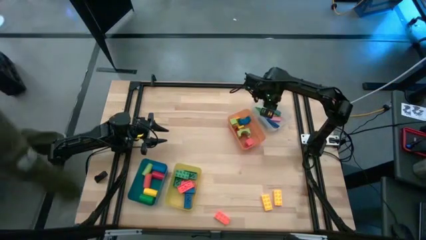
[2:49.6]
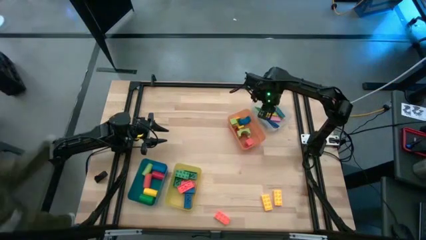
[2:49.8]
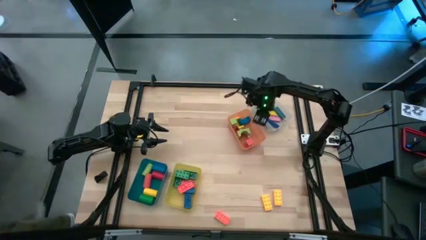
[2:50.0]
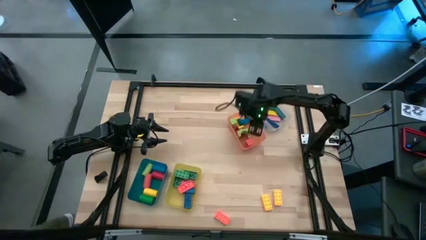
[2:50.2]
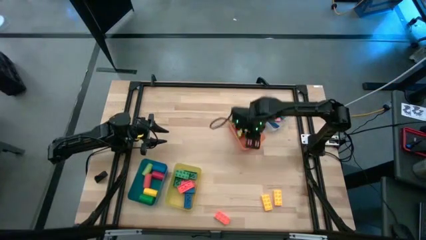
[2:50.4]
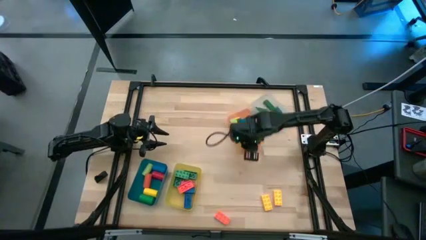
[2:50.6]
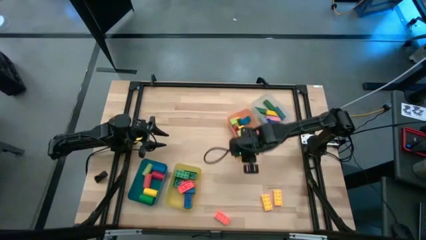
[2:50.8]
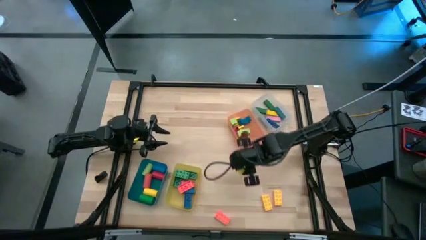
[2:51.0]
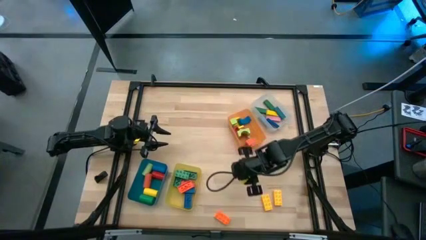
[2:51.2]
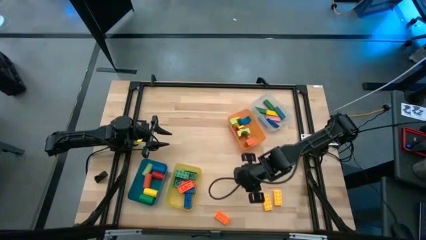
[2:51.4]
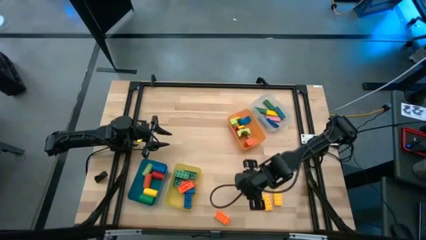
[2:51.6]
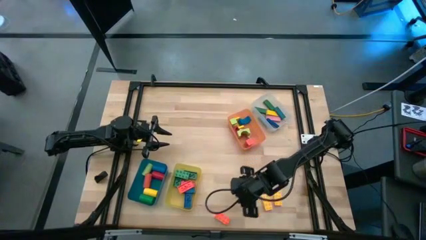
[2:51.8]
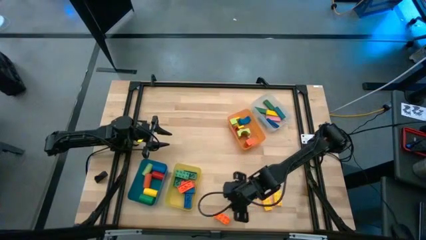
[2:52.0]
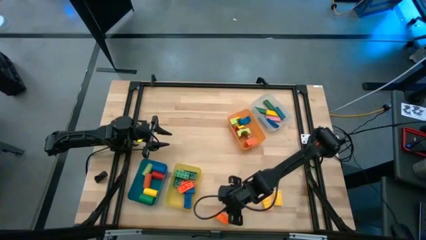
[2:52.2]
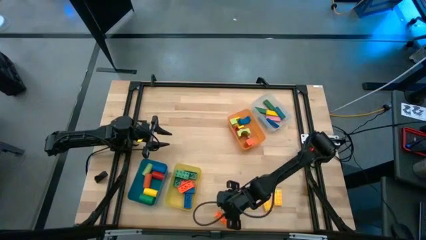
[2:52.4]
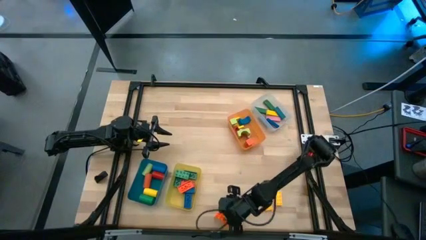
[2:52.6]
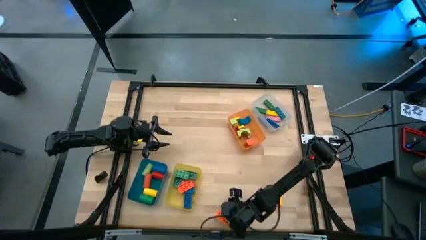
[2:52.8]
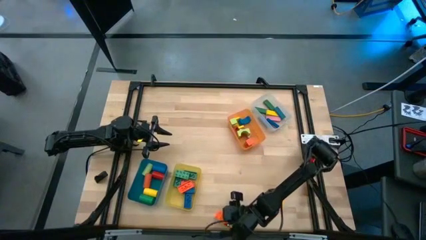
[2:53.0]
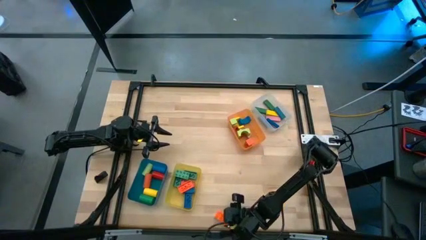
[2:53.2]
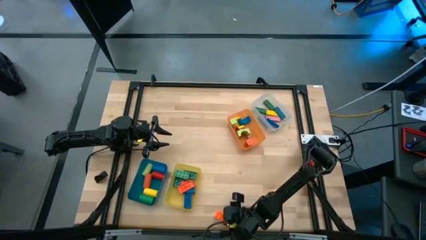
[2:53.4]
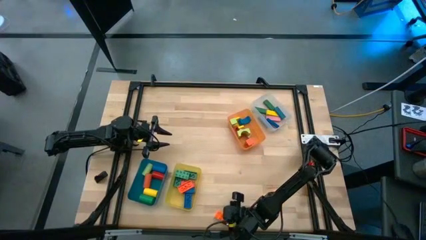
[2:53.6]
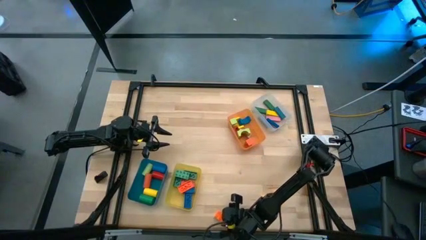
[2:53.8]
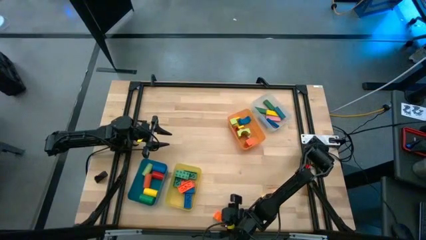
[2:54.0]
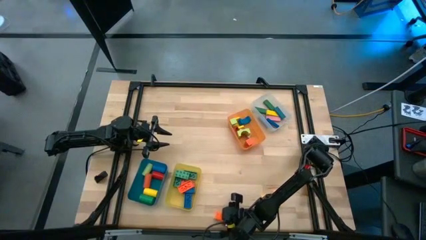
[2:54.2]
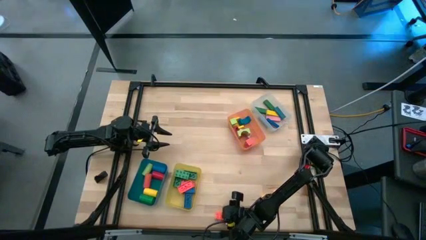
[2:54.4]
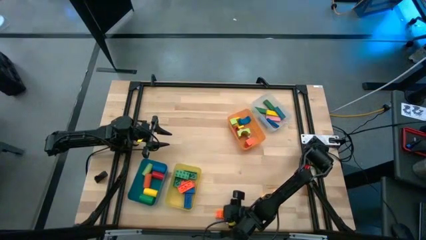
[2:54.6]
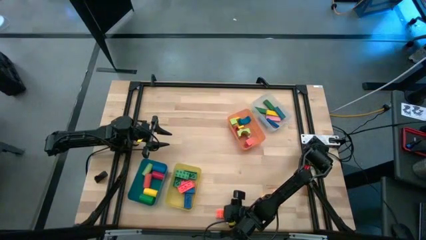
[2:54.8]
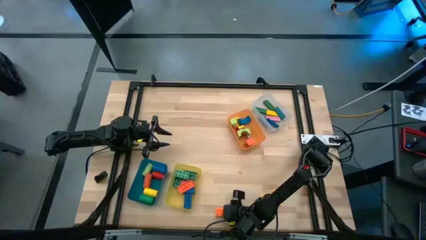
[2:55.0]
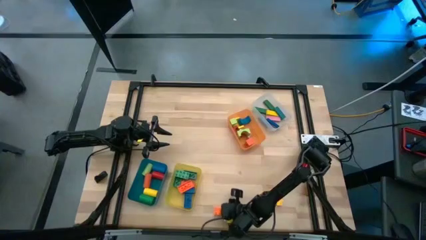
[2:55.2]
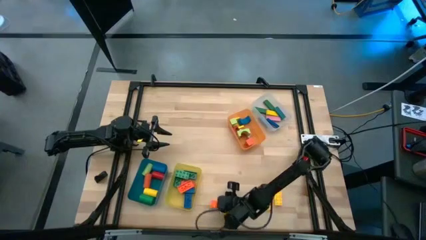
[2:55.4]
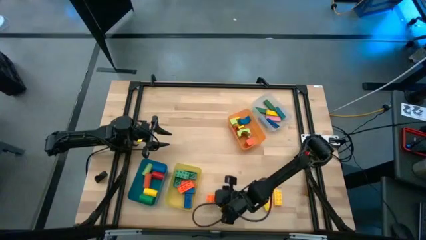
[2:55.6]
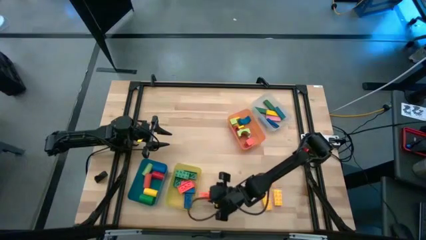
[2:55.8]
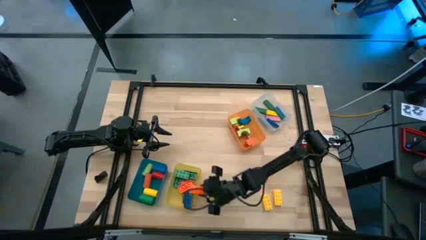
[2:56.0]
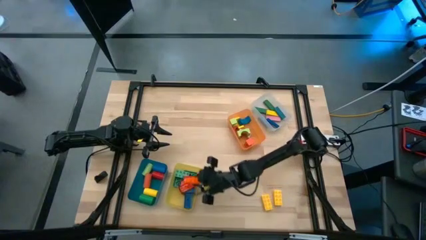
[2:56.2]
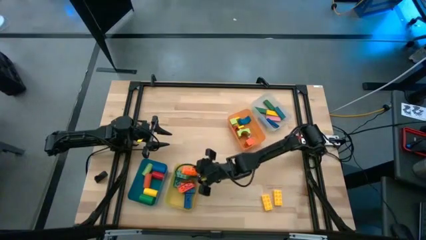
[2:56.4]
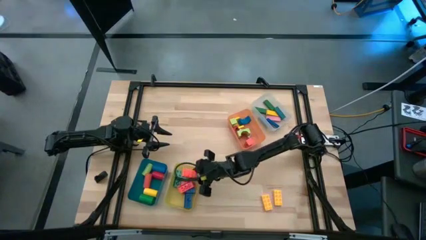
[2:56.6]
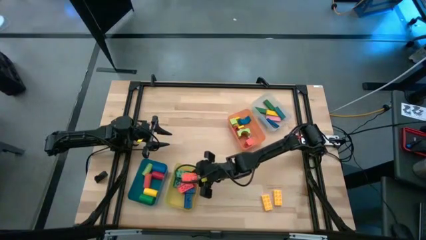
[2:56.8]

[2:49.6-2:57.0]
Task: Sort blocks by size
Put the orange rectangle game piece into the yellow bin

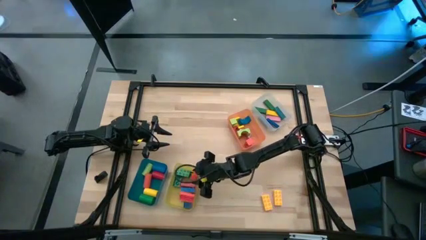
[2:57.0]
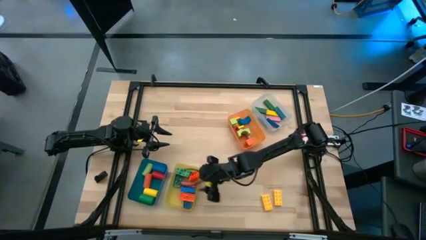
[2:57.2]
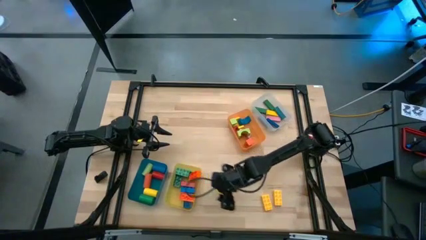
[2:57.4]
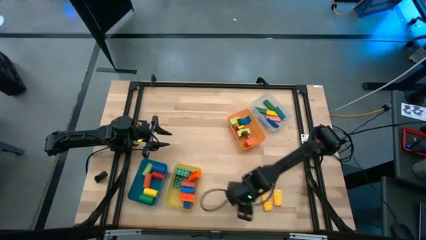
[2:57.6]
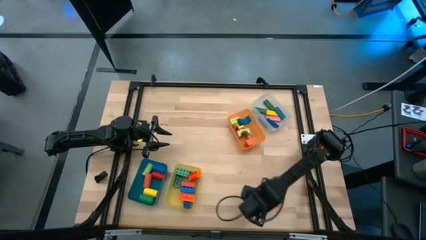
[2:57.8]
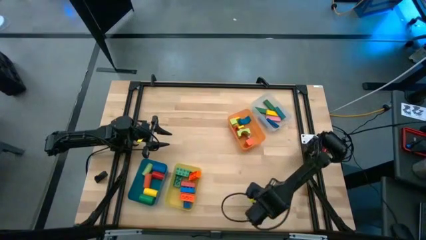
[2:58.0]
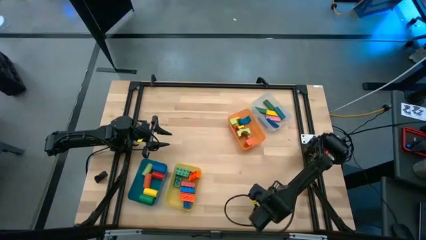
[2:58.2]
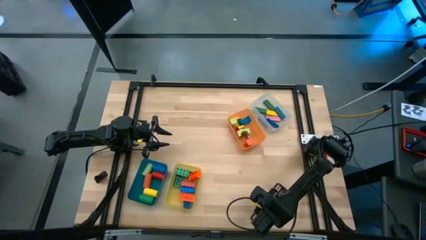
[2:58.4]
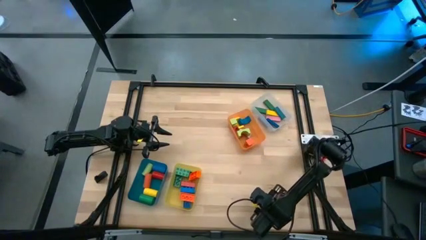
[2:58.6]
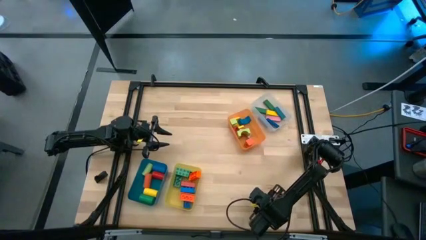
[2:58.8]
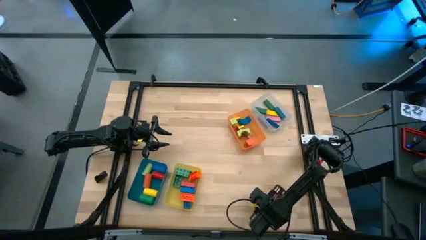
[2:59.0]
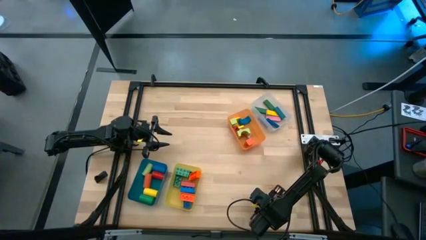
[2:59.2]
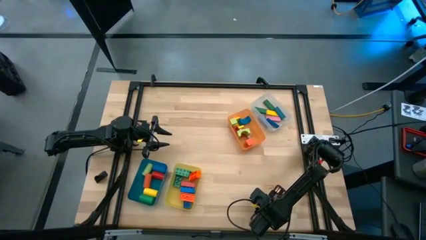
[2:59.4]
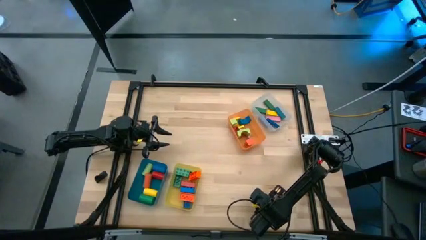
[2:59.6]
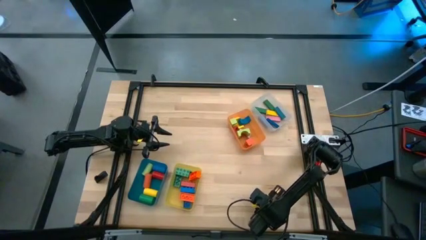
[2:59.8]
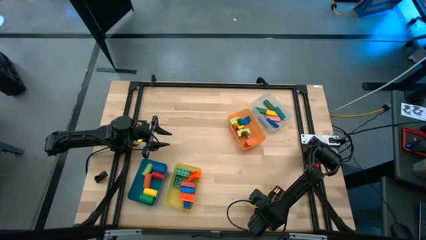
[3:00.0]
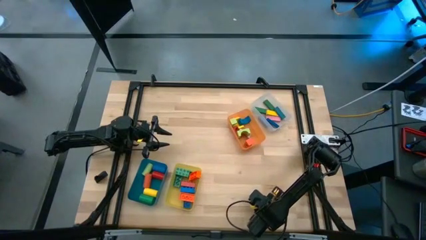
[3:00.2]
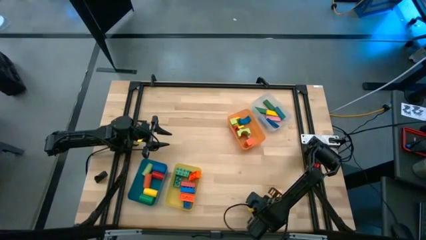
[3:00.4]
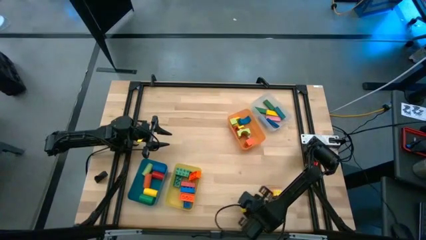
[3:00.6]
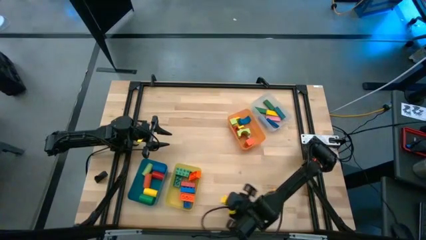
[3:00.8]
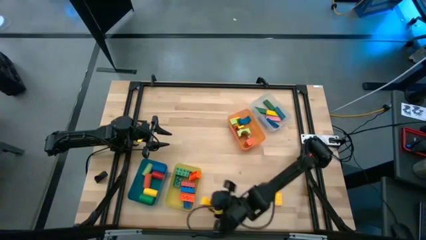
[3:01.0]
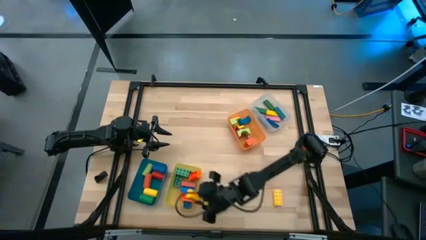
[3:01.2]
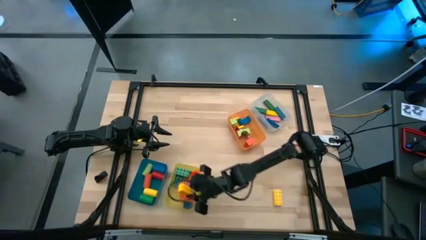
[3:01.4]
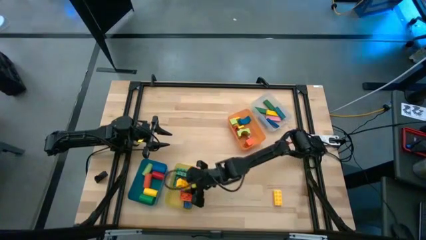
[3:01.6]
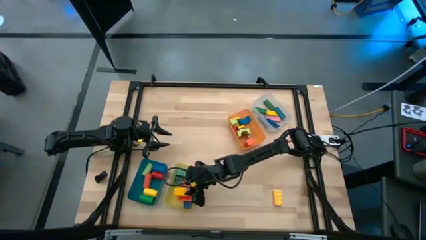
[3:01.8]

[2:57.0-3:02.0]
Put the yellow rectangle game piece into the yellow bin

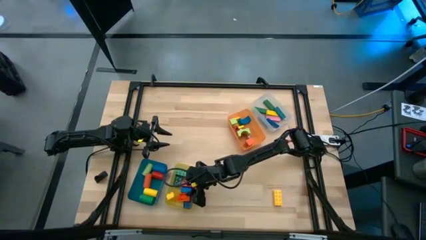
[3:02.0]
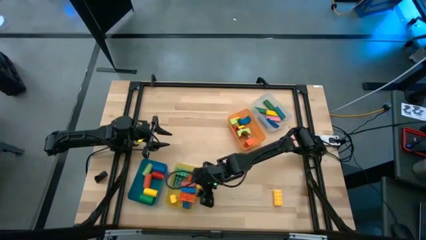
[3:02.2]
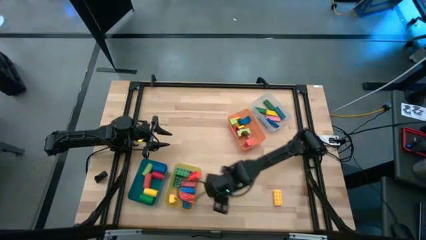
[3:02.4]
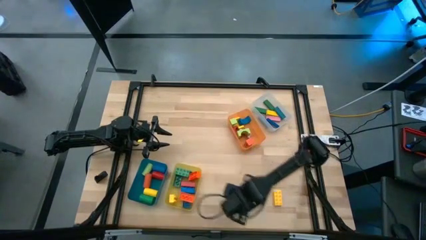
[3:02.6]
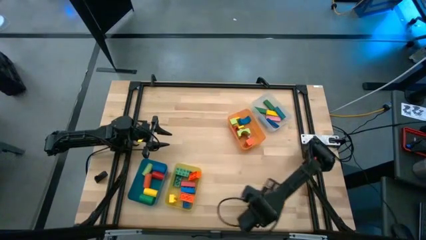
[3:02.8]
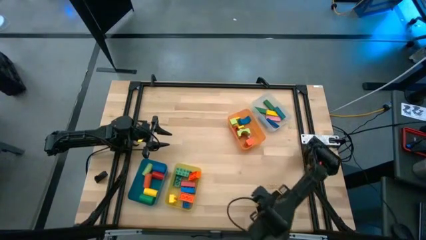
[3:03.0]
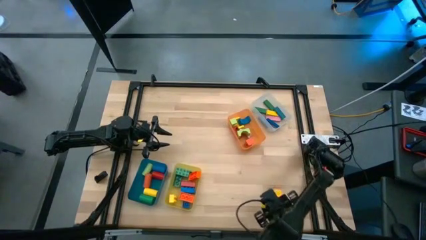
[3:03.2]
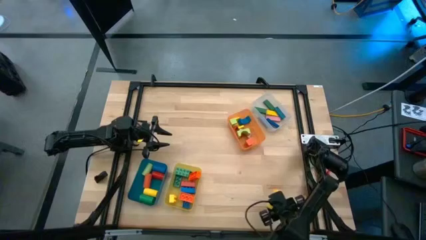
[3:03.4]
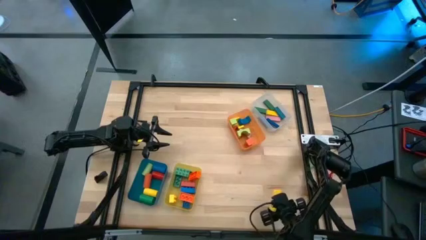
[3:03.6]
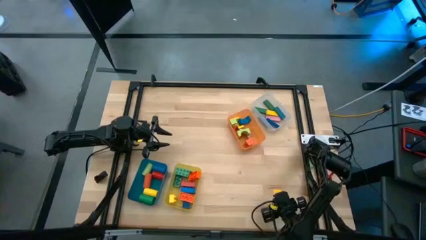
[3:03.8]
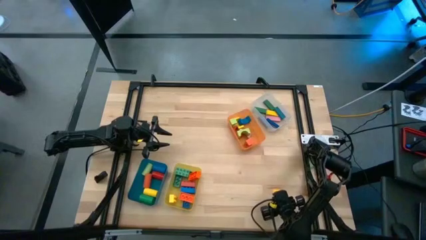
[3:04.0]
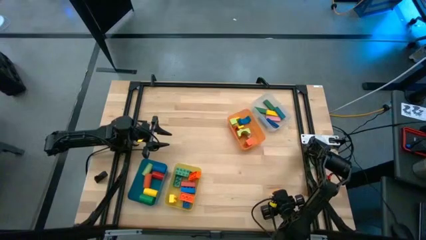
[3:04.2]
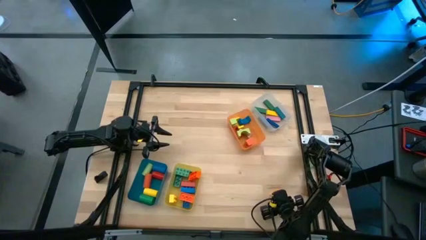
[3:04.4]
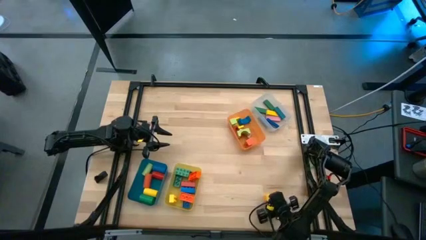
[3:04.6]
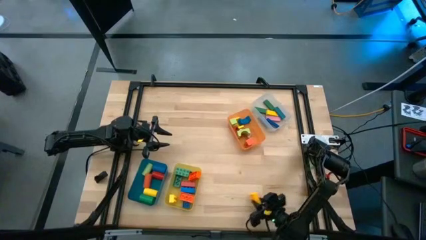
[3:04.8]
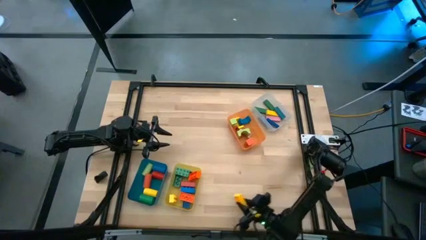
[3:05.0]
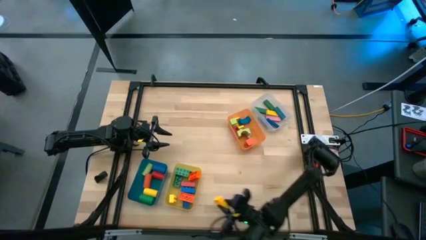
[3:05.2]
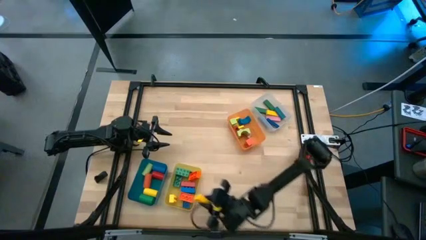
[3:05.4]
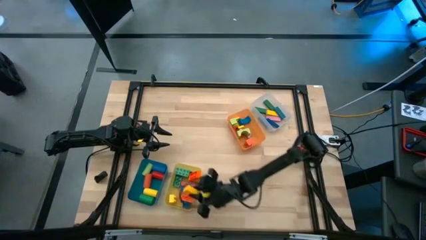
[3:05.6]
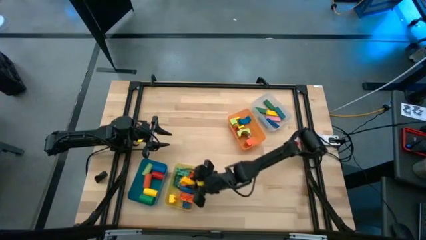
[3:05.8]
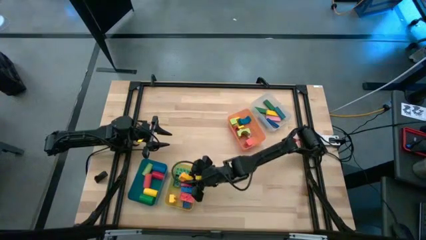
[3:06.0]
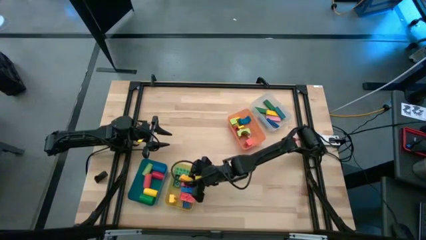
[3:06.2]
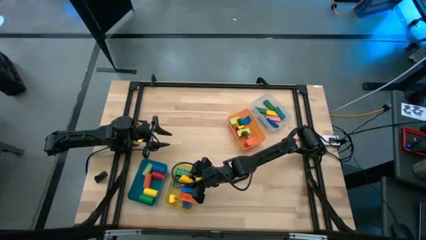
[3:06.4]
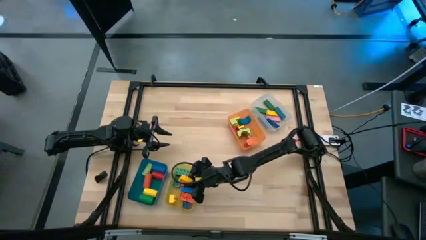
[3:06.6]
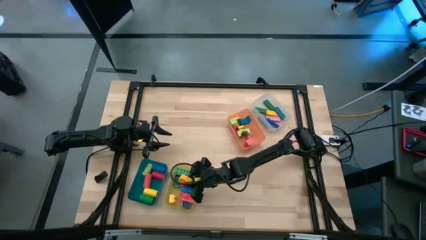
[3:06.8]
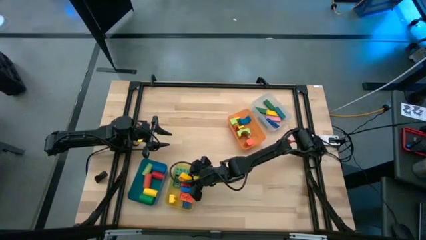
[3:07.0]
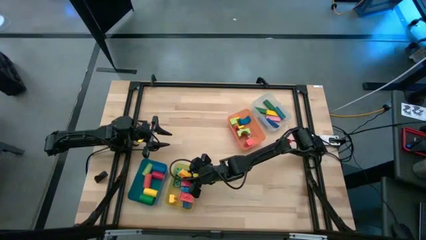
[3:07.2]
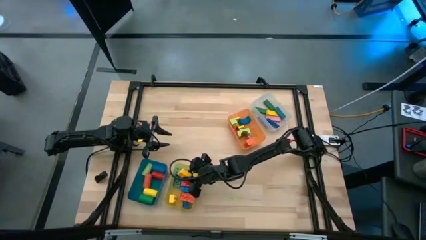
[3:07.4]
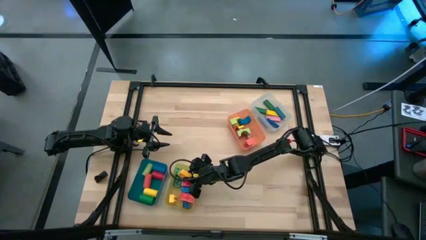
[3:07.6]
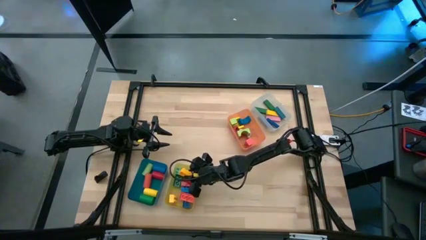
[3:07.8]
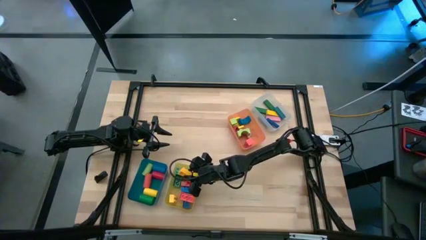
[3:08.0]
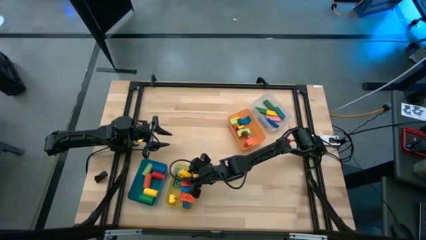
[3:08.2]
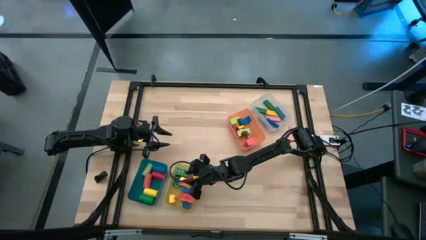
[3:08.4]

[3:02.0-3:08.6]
Put the yellow rectangle game piece into the yellow bin
